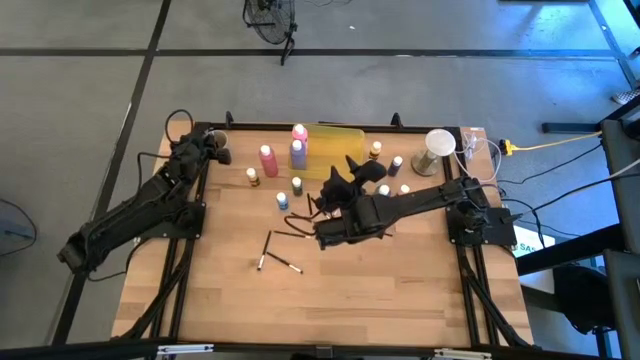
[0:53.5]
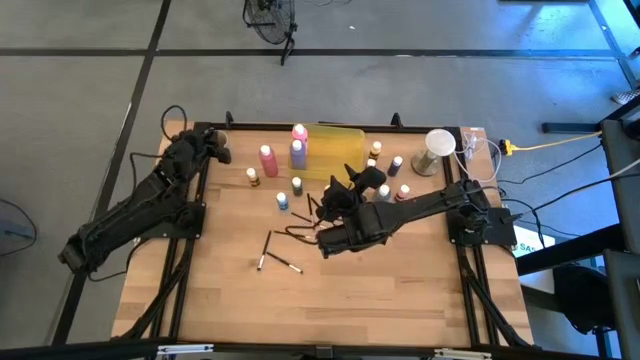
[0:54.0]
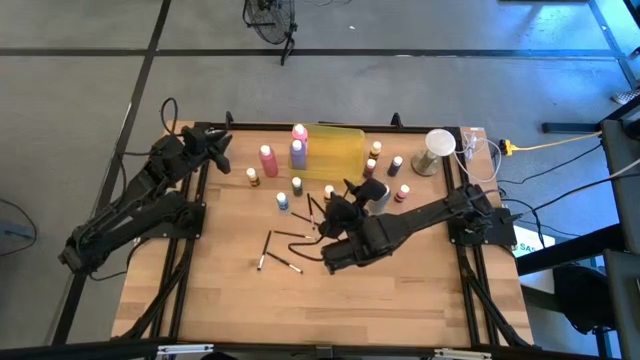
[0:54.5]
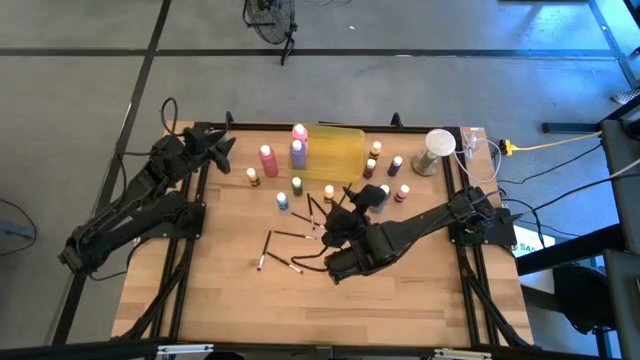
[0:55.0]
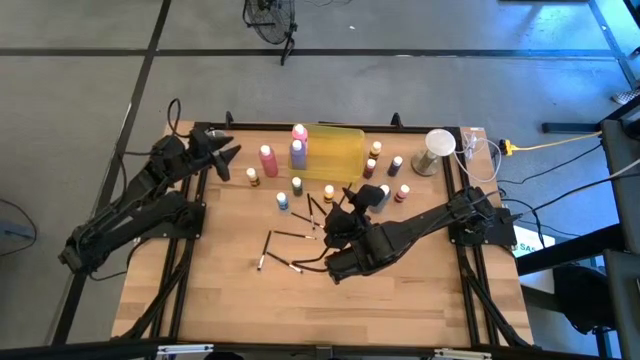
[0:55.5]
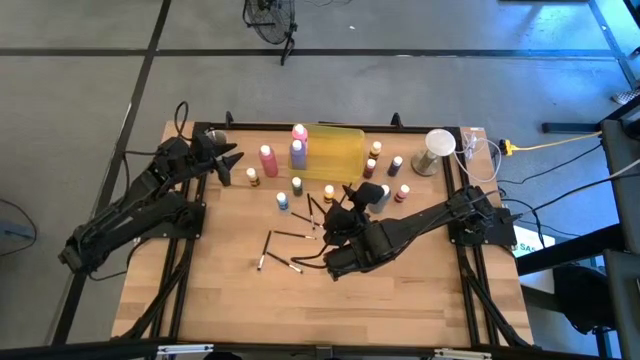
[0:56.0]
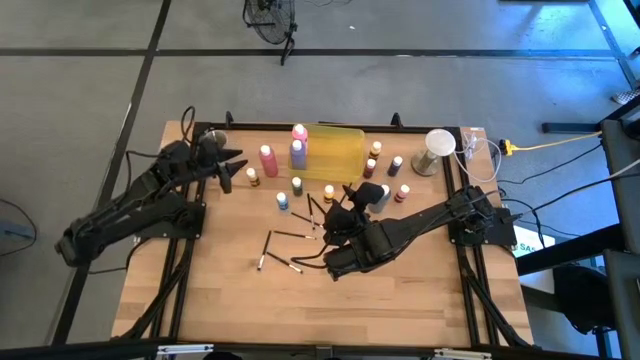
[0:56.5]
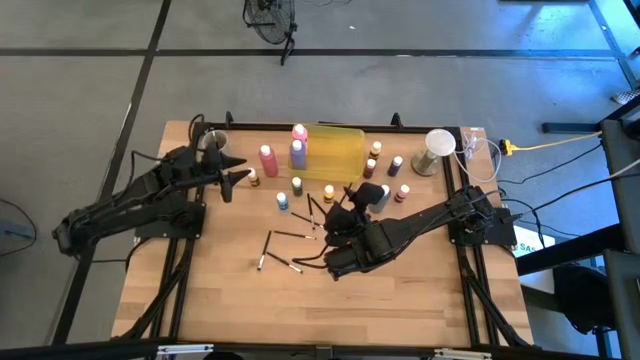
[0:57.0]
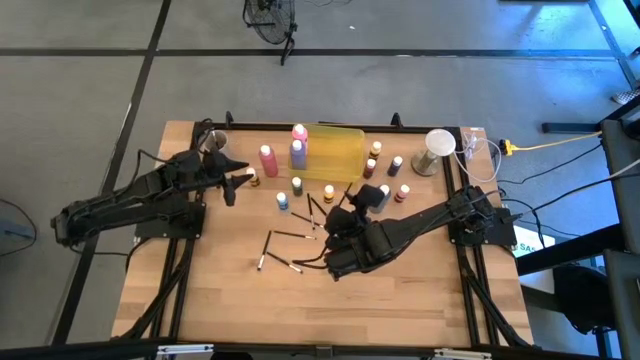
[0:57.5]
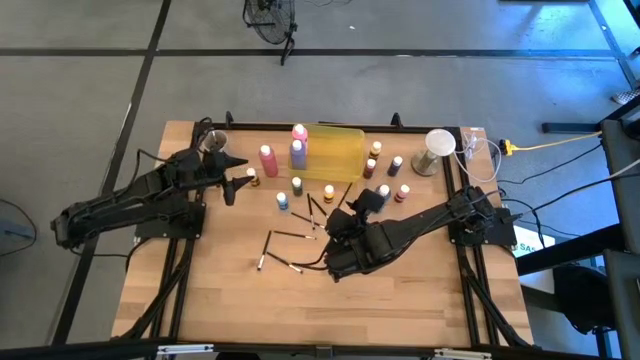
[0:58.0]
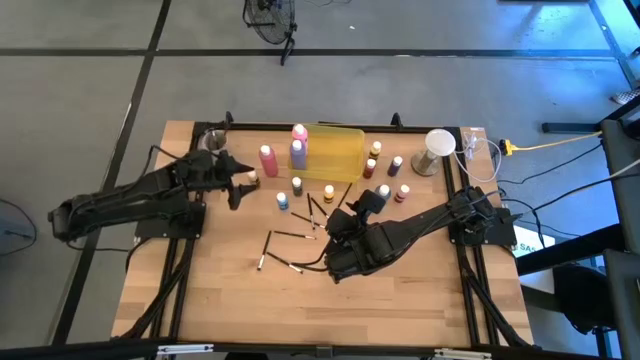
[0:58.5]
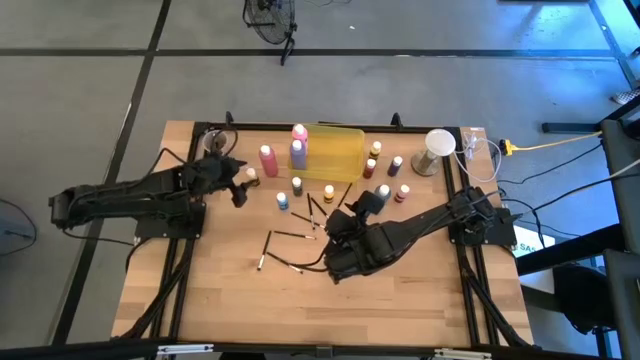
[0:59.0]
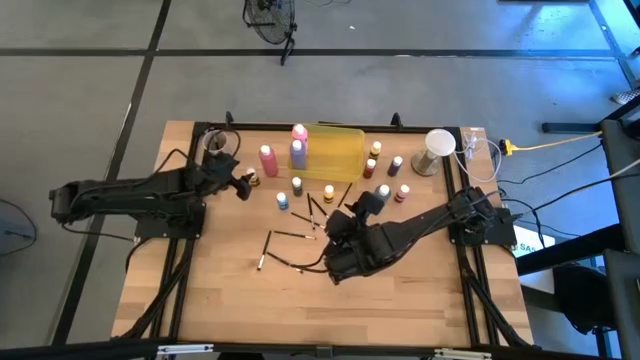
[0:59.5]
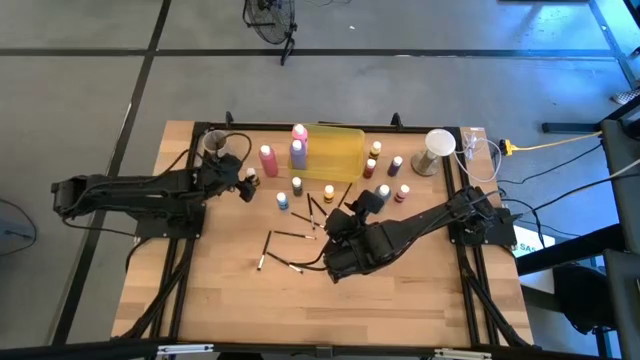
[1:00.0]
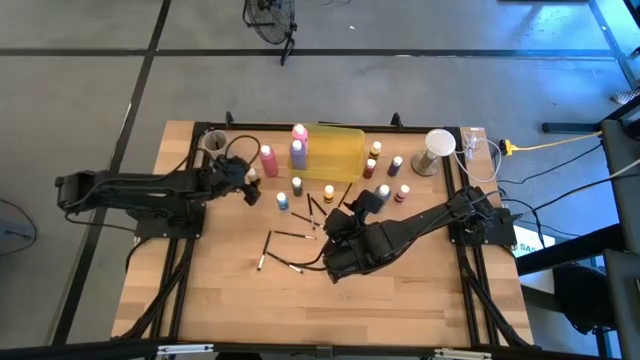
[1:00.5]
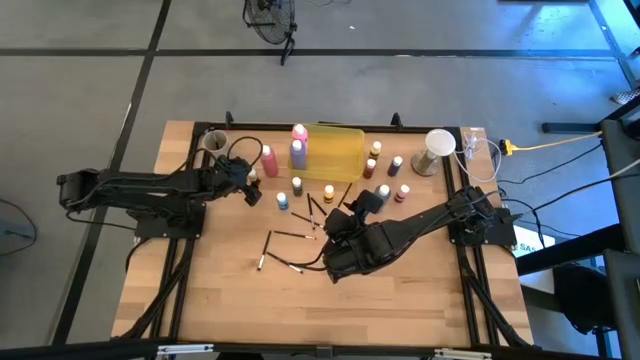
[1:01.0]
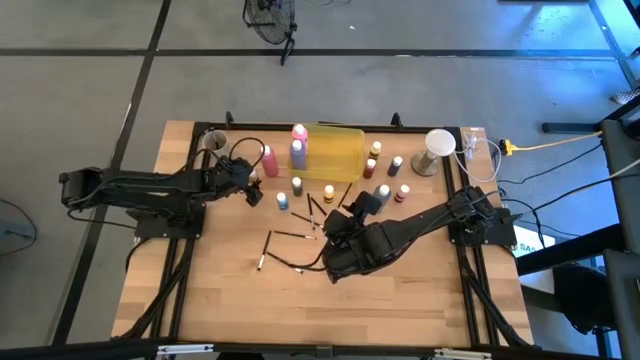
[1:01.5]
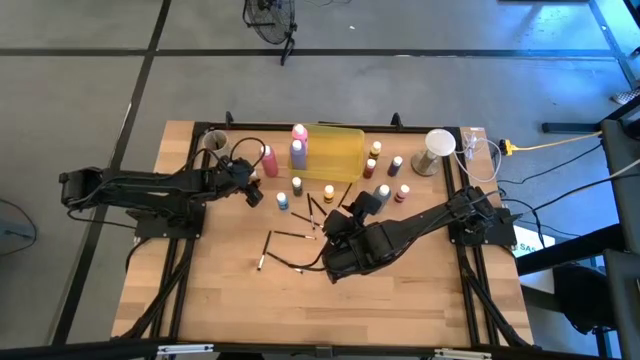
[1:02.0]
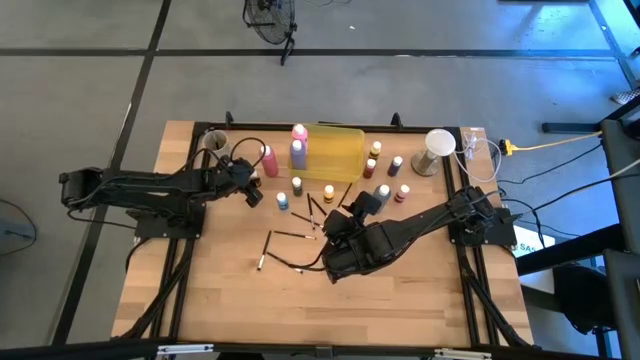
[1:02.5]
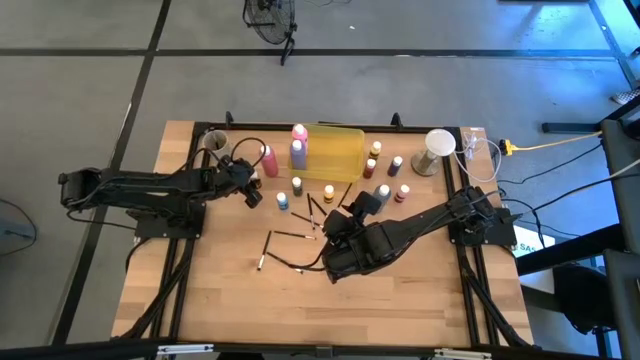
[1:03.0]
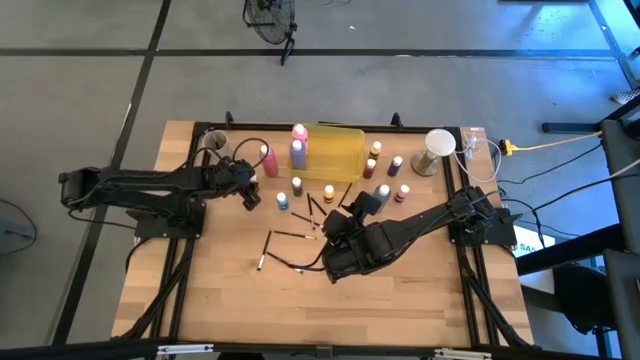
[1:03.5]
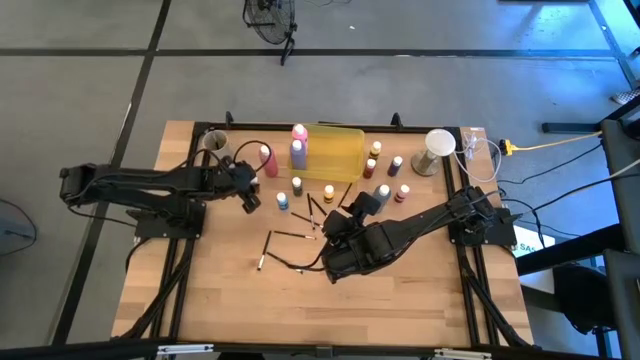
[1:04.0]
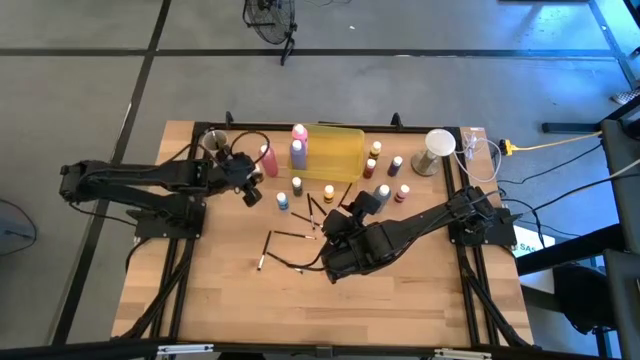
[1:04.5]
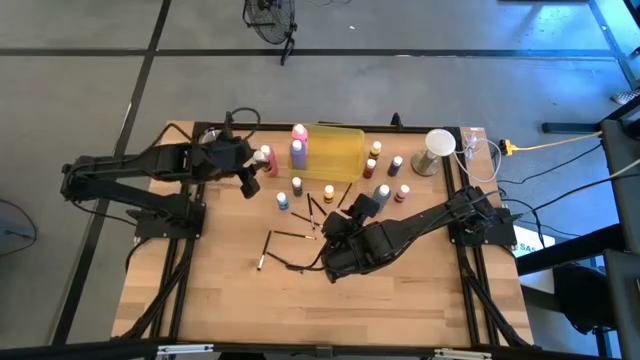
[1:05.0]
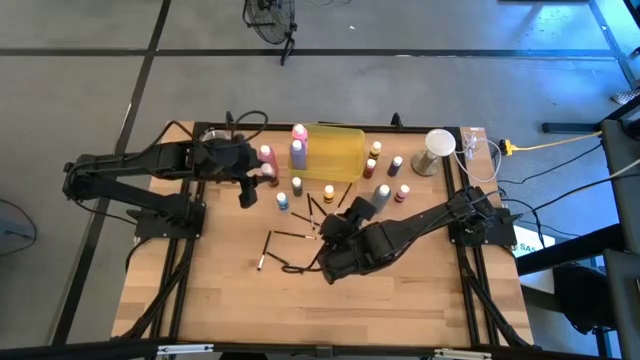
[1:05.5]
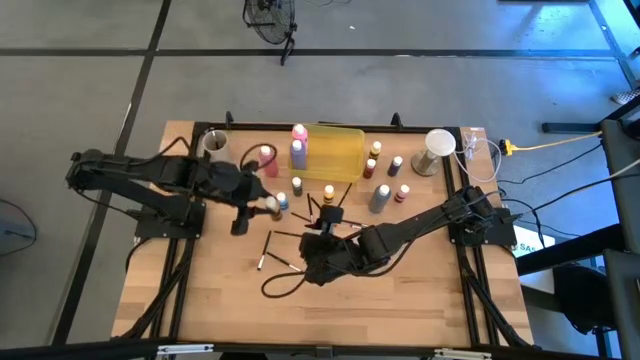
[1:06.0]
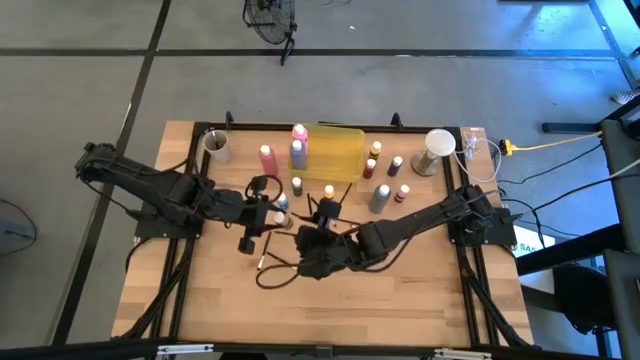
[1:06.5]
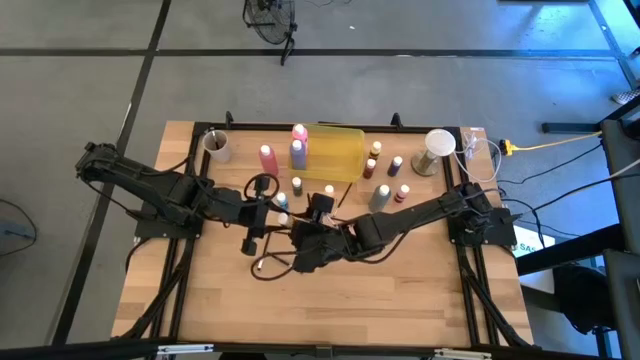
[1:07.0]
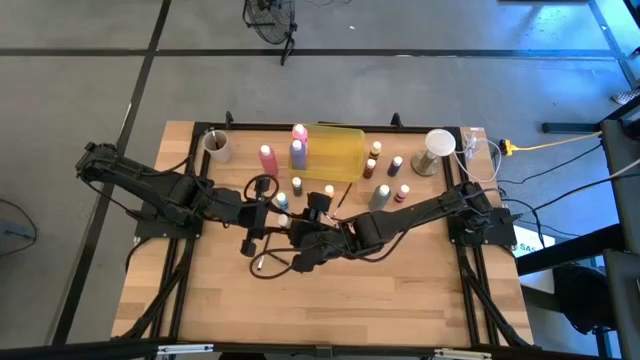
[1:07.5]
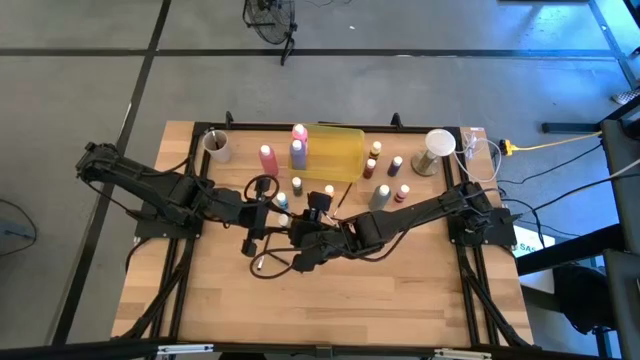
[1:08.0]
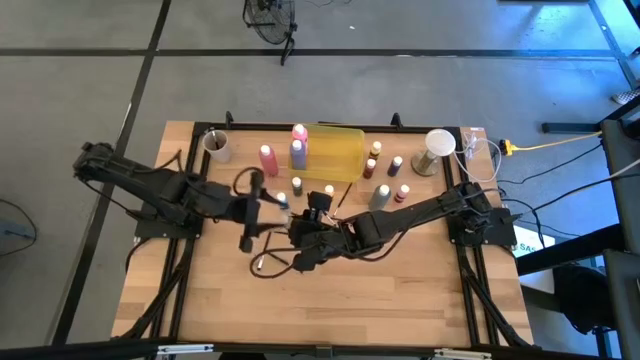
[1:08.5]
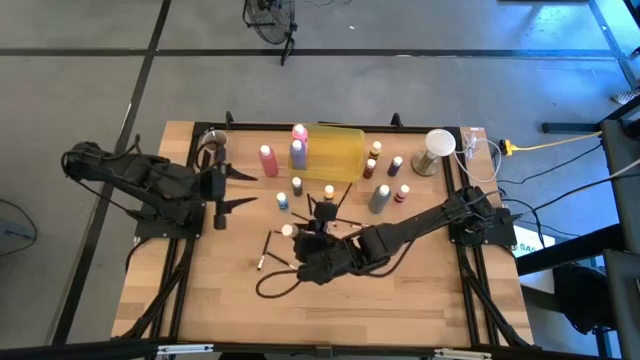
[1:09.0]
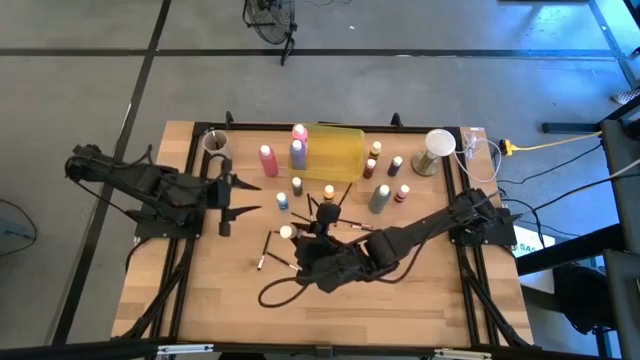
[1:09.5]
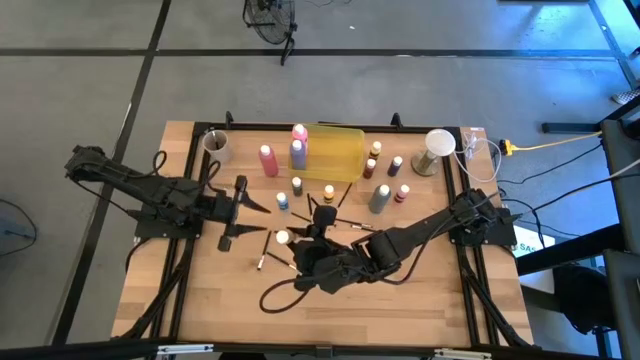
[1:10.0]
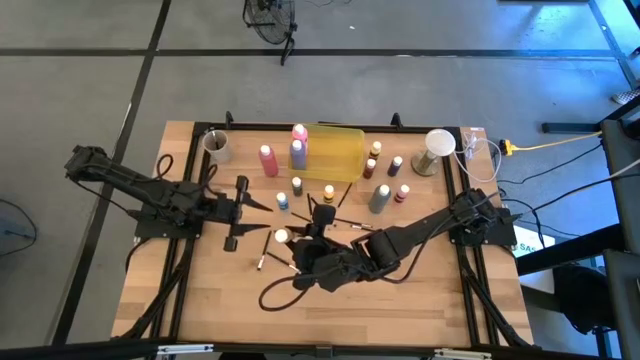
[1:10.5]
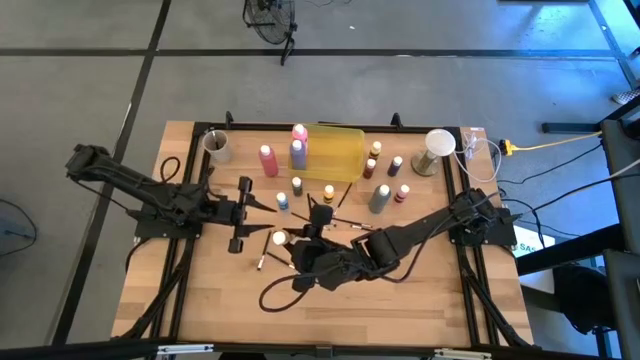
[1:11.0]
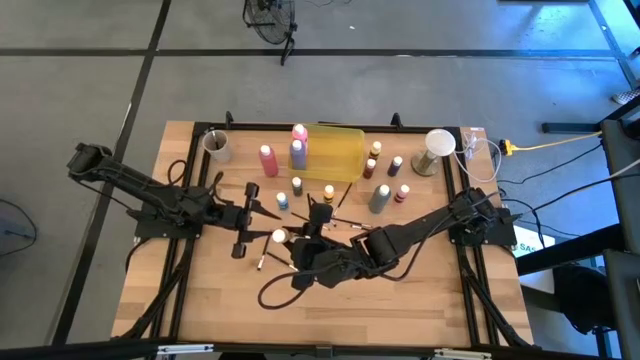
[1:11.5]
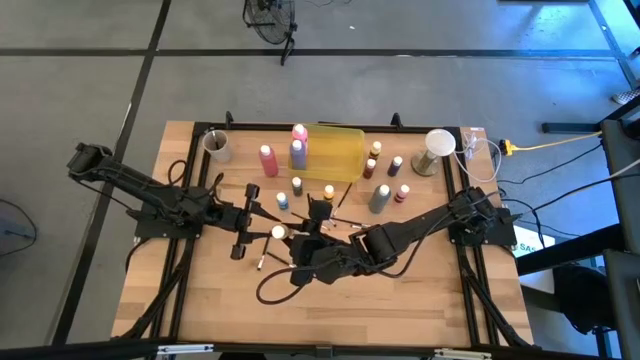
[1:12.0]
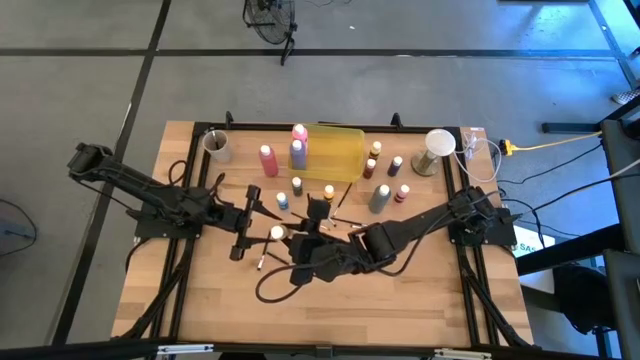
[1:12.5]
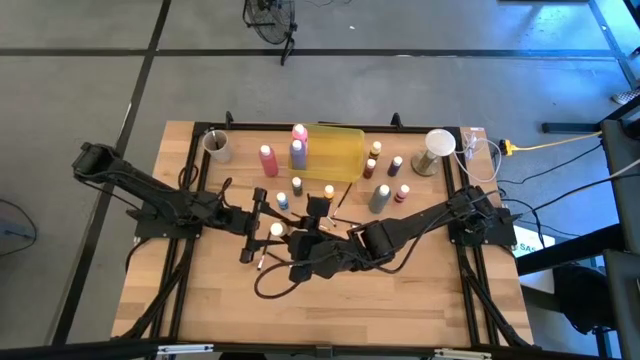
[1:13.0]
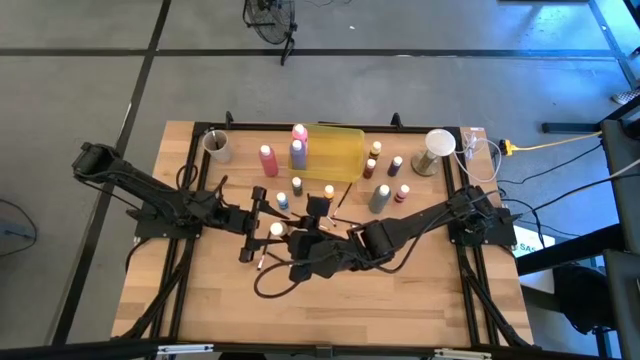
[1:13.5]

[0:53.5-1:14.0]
Task: Pick & Place Paint Supplies
Put the small dark yellow paint bottle into the yellow bin
